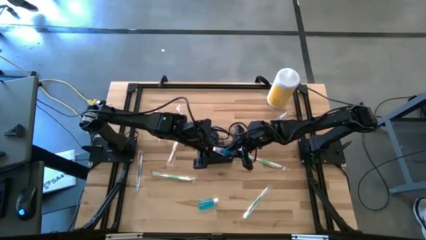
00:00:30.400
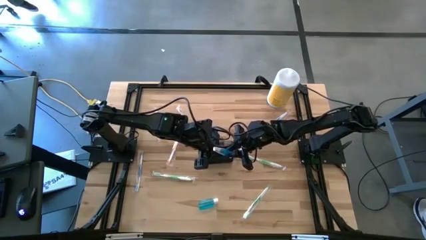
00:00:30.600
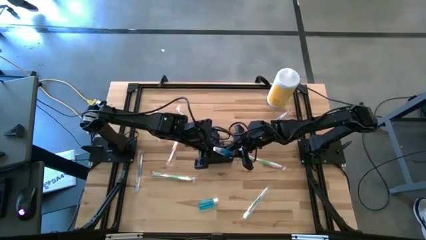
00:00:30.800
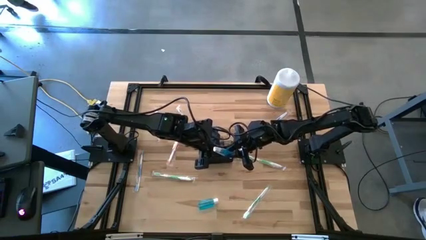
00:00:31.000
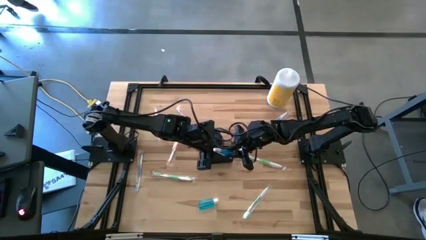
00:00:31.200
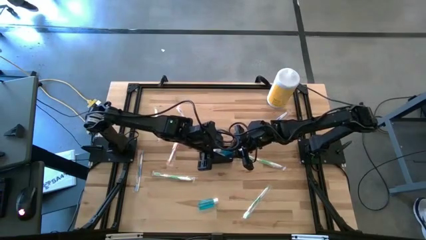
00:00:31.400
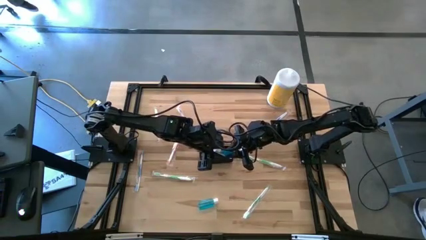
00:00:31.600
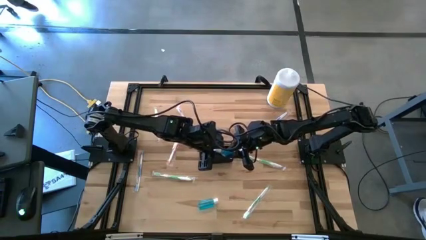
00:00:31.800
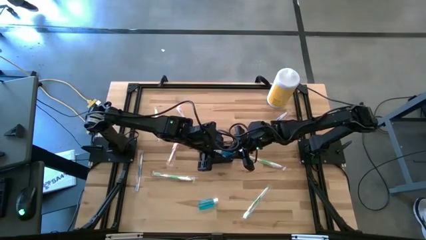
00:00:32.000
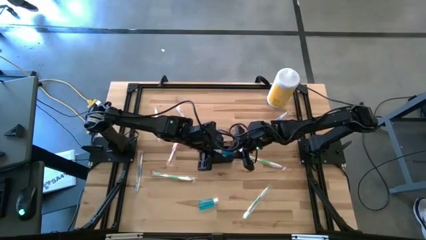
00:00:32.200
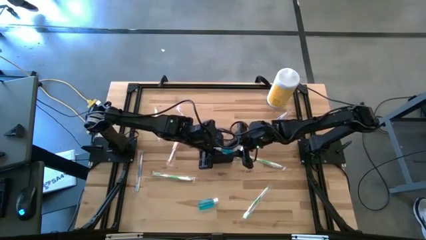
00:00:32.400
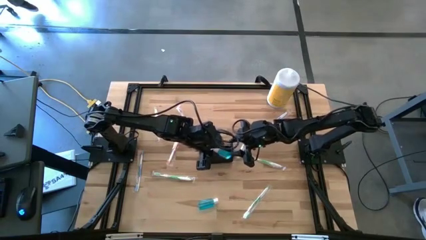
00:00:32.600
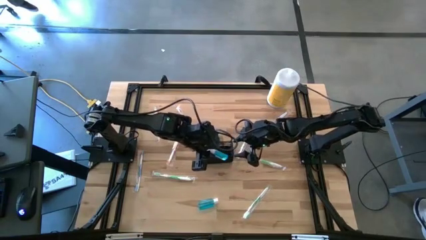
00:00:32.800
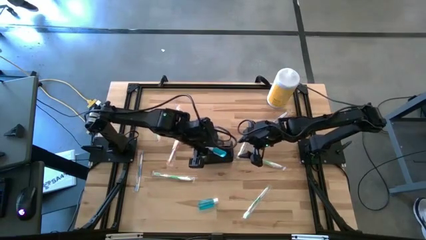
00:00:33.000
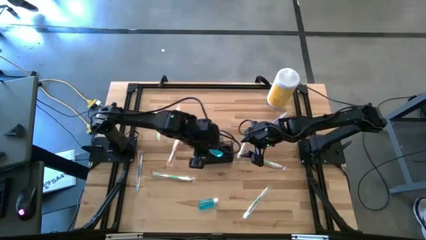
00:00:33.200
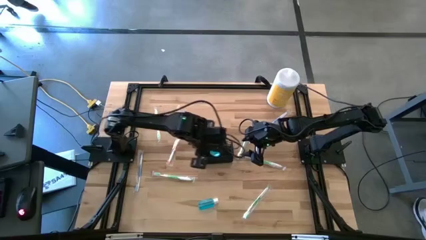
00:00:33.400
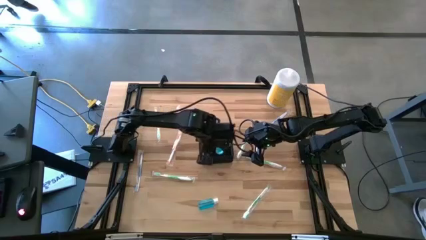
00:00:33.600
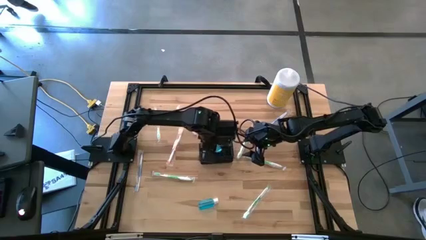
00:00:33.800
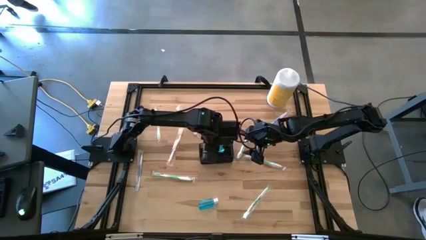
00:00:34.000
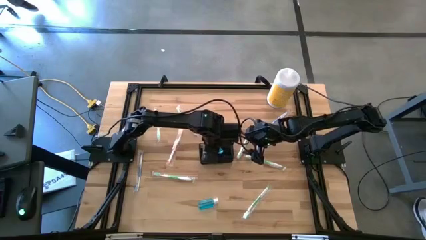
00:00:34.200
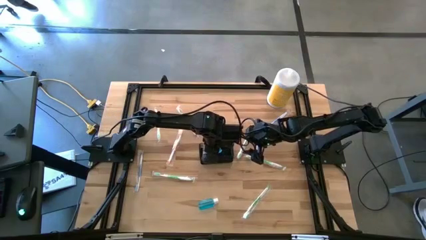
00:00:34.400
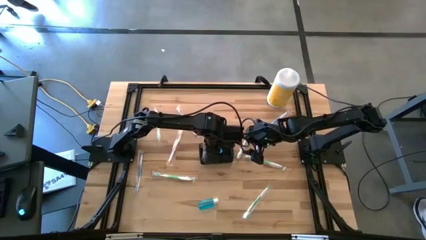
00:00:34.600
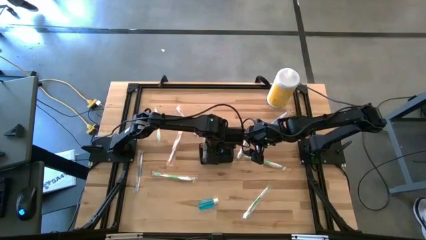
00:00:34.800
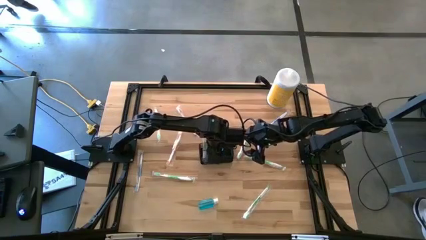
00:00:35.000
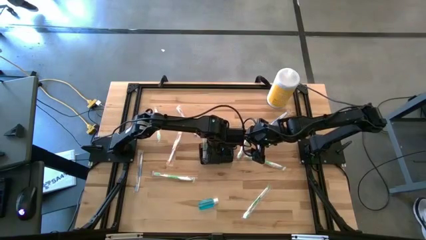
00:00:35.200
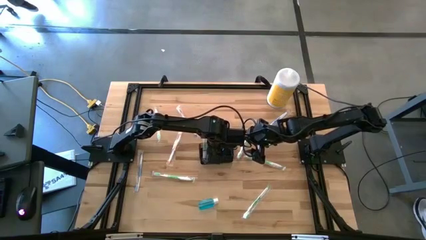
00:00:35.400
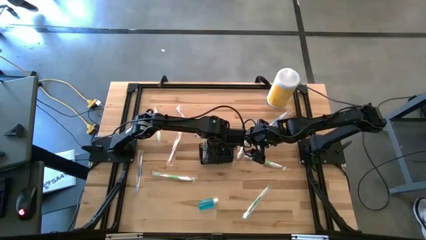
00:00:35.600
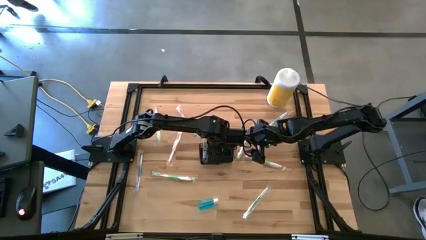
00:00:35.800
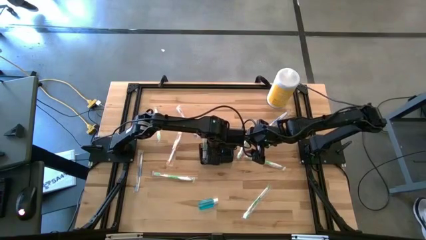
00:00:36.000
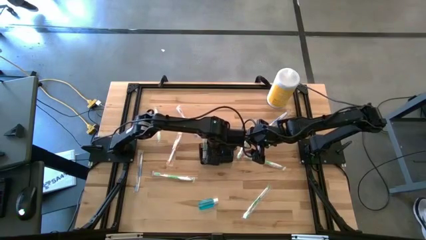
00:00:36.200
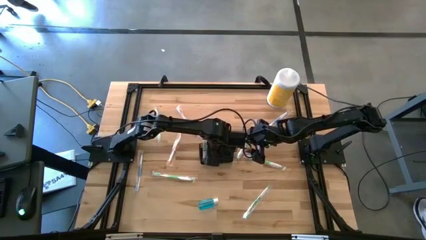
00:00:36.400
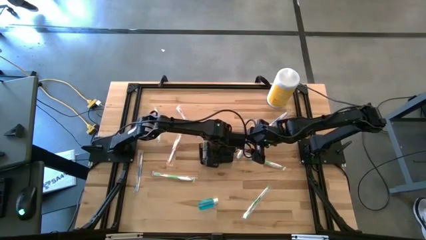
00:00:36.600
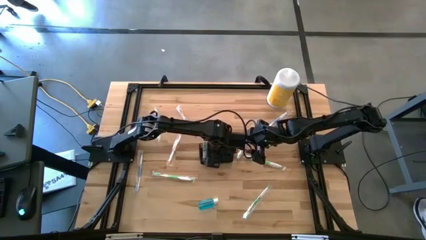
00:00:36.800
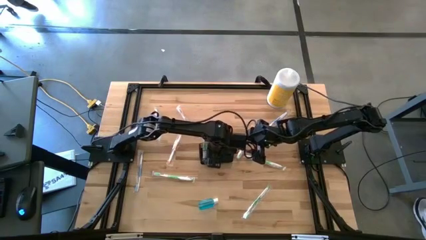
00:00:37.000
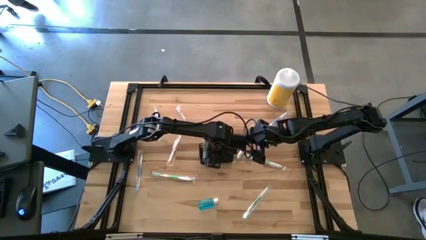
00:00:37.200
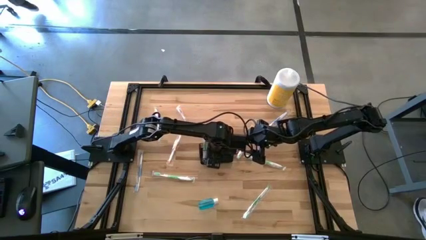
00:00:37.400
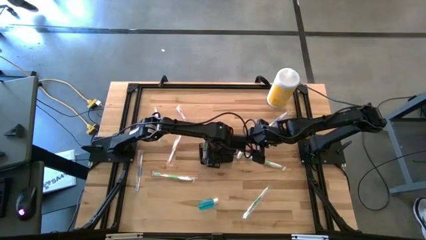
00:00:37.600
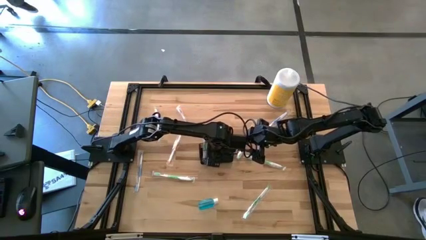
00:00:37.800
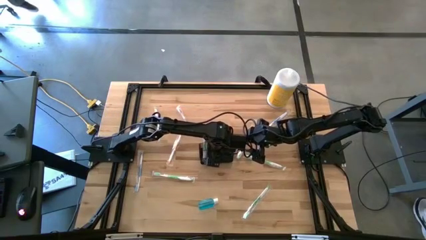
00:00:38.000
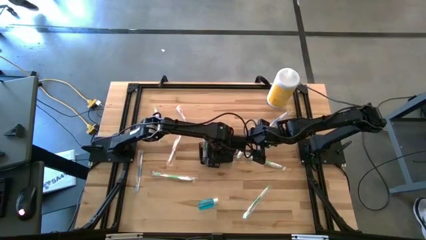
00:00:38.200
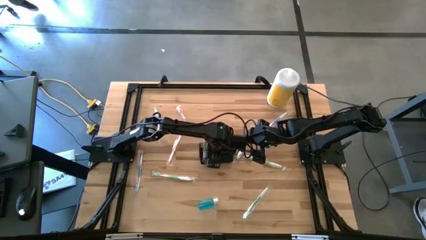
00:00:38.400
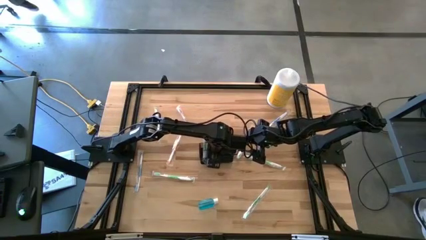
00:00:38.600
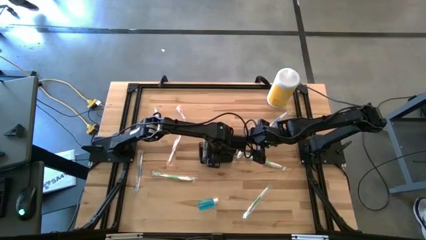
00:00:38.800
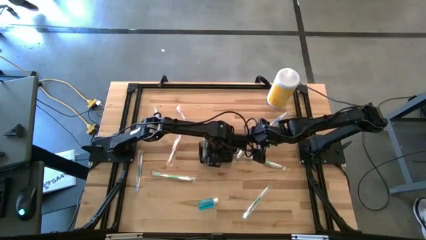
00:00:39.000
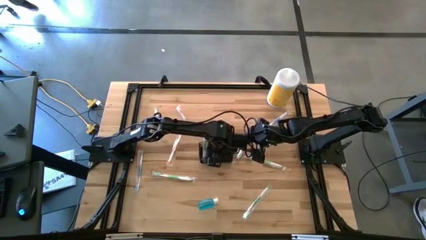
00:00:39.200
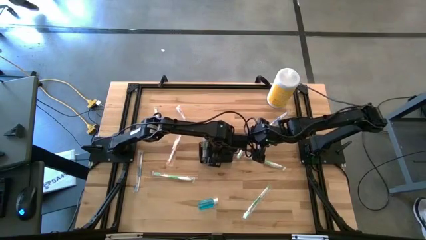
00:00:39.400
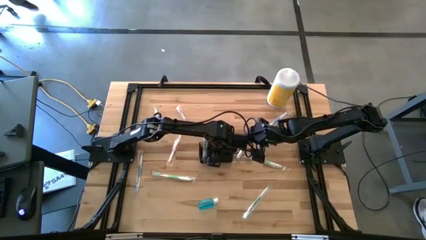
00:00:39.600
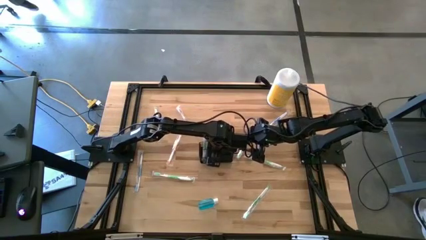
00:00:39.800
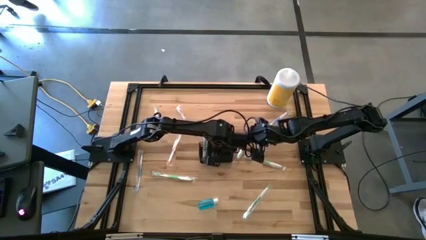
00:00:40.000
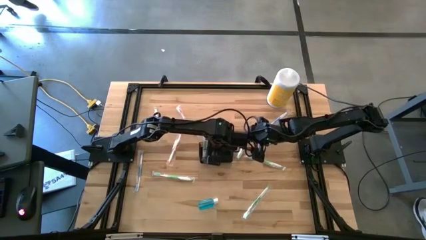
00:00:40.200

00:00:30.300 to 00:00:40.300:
Task: Pick & Place toothbrushing station
Put the top blue mouthwash into the black mesh organizer

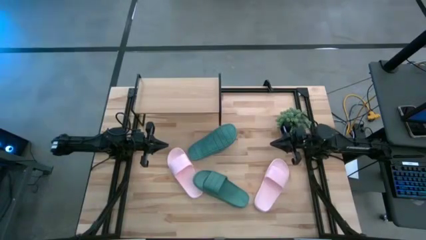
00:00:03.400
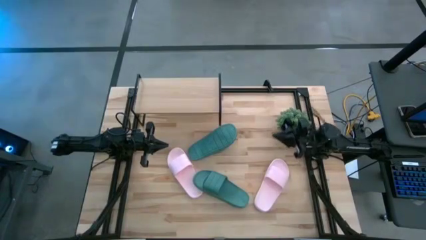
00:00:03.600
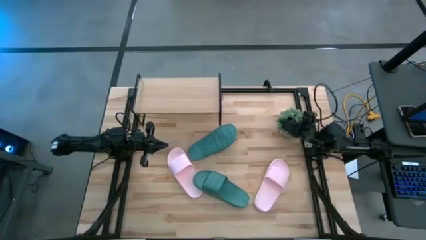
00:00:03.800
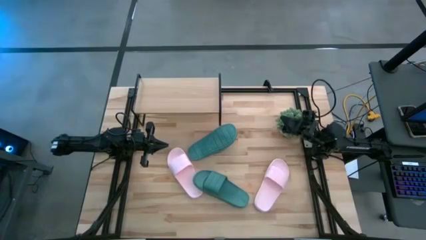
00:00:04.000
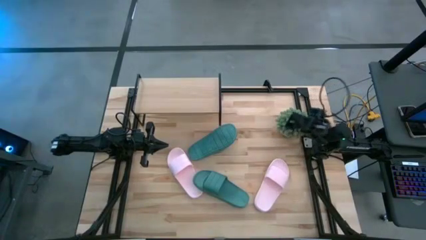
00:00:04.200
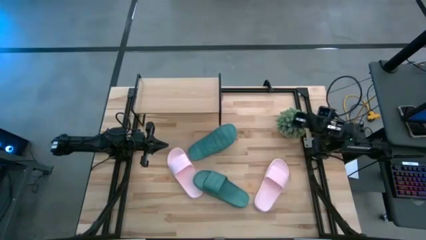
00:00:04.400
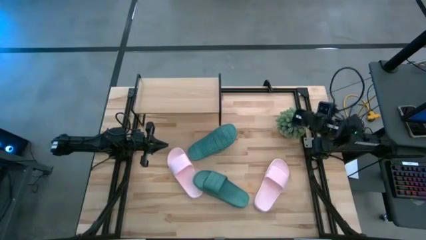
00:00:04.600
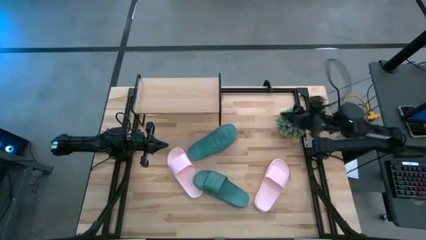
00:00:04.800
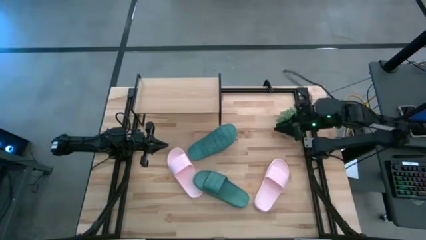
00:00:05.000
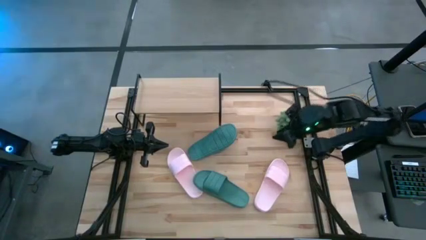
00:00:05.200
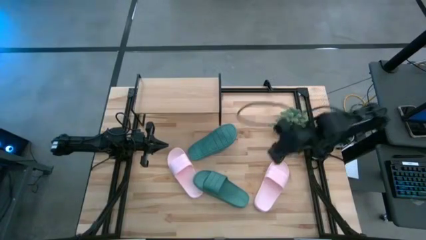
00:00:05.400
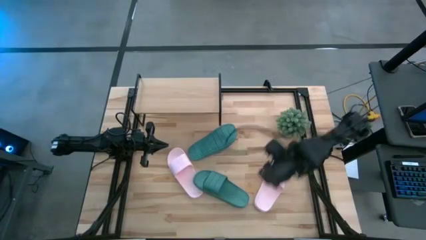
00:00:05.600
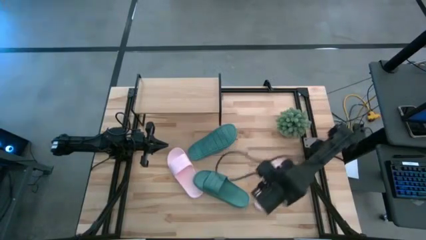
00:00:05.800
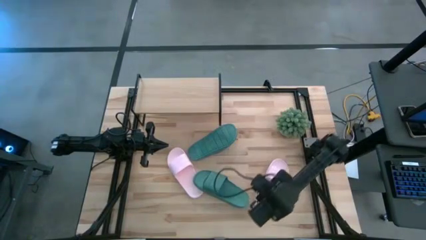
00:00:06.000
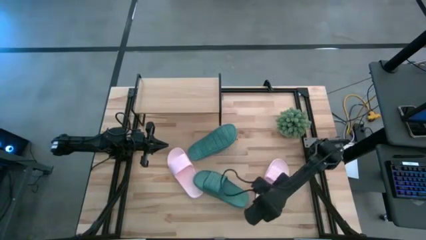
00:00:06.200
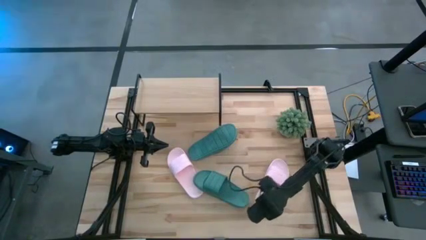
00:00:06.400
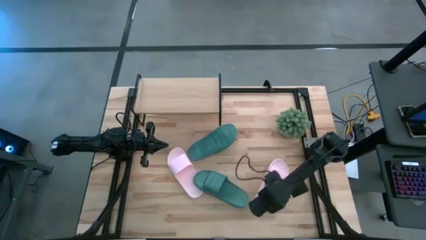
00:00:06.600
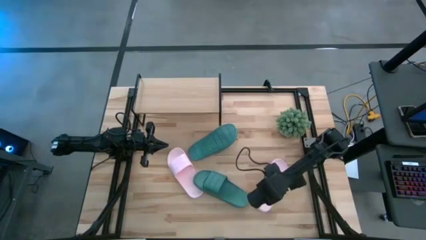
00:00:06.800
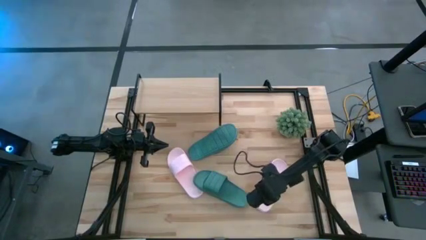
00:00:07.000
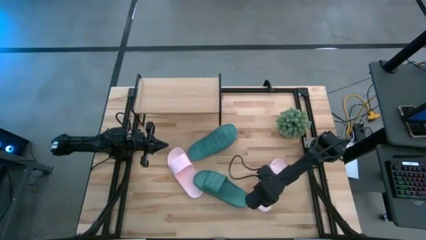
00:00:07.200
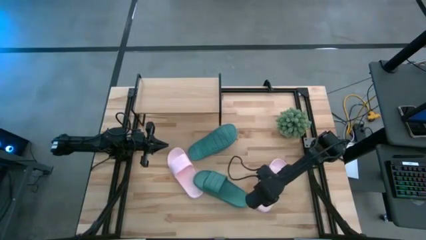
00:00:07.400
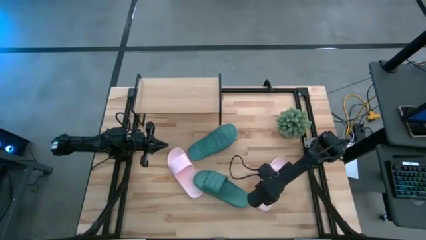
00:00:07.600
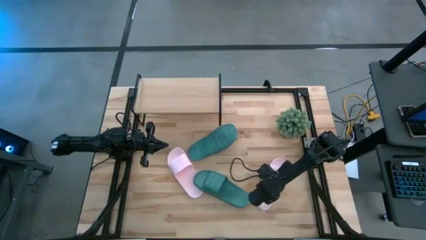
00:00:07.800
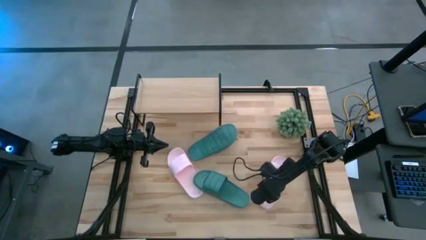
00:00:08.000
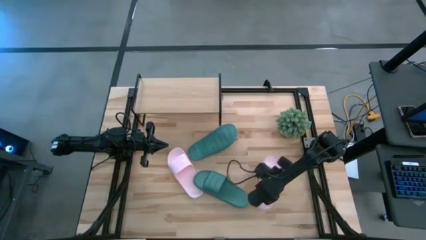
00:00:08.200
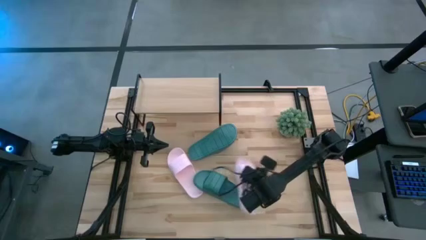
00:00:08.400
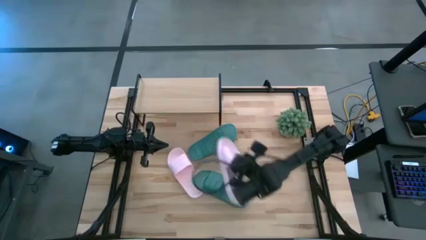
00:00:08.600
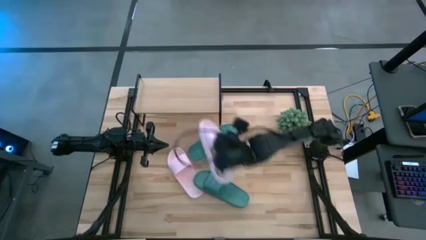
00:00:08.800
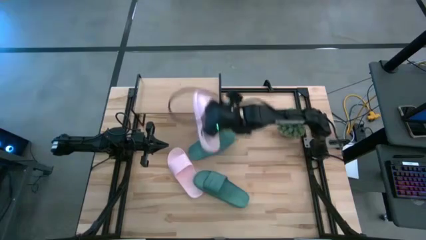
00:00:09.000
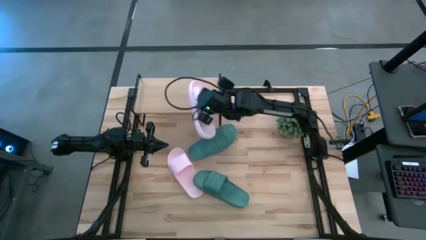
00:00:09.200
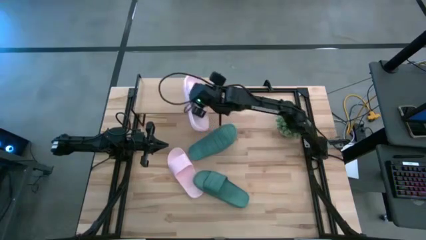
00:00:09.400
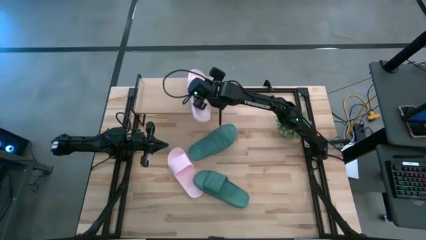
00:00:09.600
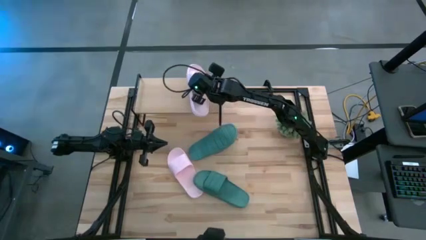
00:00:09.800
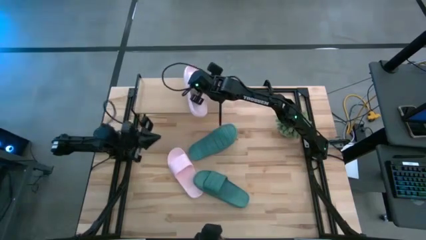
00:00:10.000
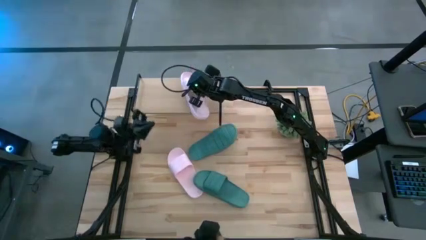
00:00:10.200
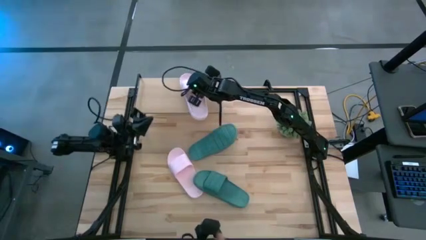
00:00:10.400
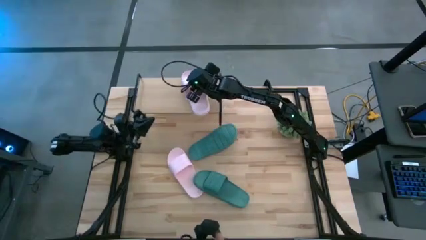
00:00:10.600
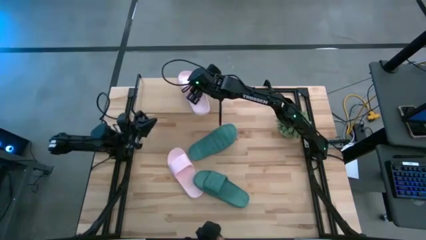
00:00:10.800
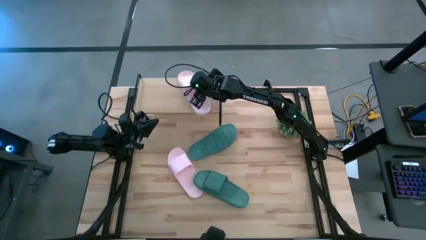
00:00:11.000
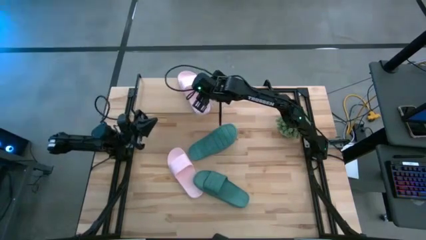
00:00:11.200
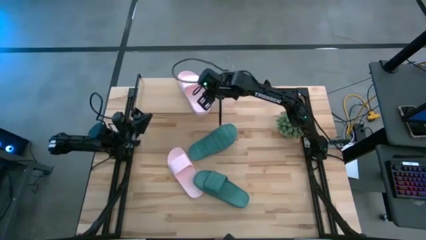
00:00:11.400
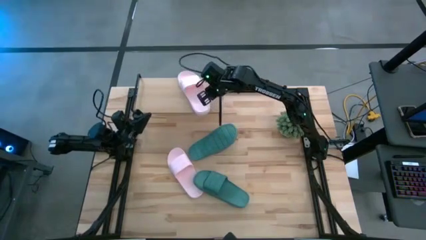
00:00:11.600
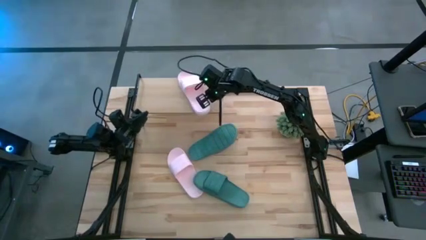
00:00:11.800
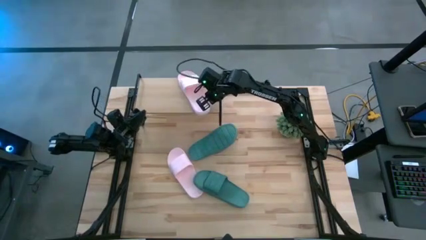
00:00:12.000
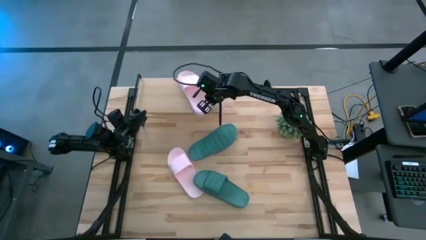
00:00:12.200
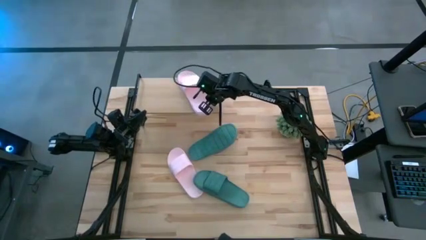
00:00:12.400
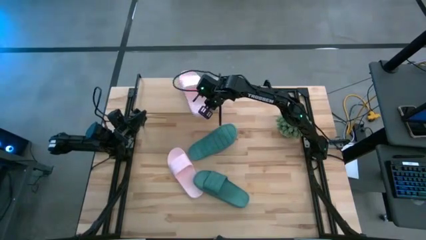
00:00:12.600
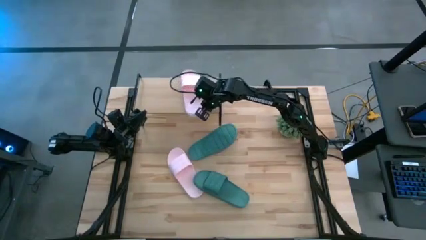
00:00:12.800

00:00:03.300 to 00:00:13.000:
Task: Pick and place slides into the shelf
Put the right pink slipper on the shelf
